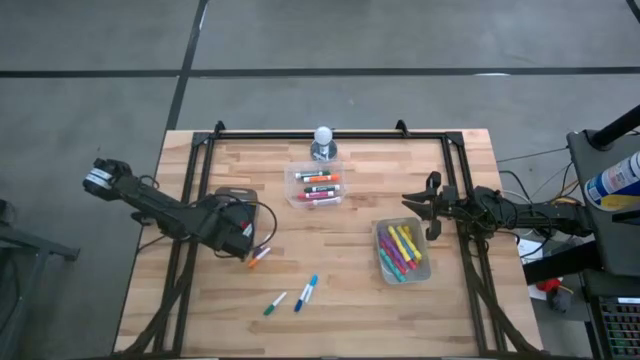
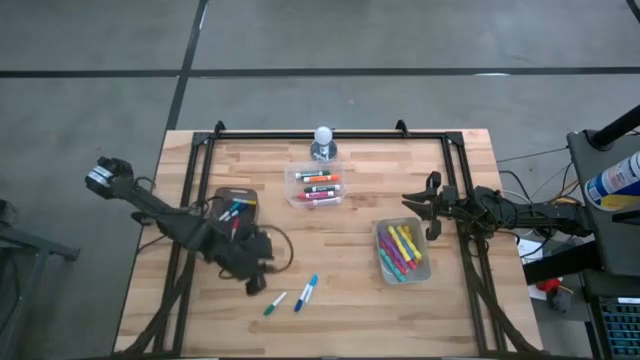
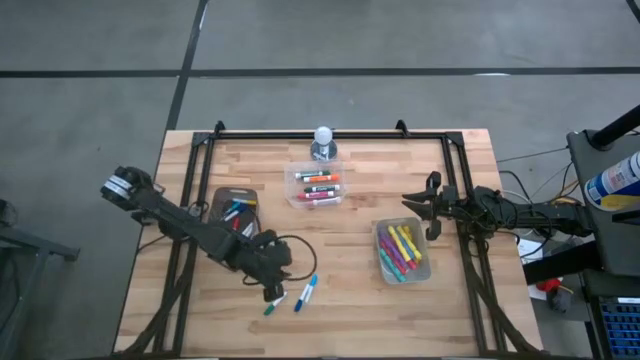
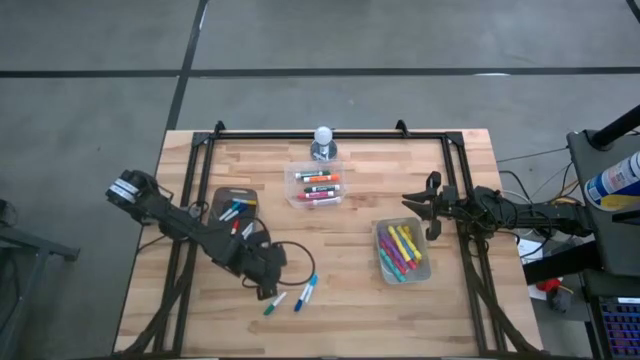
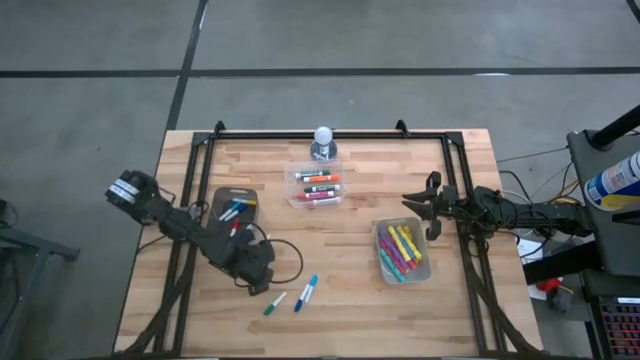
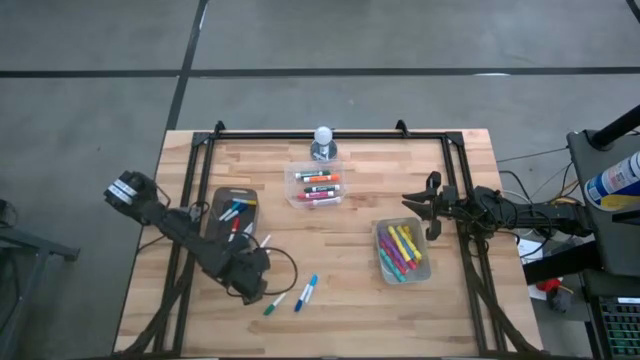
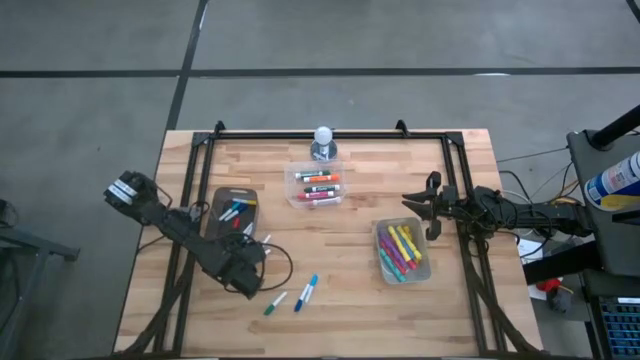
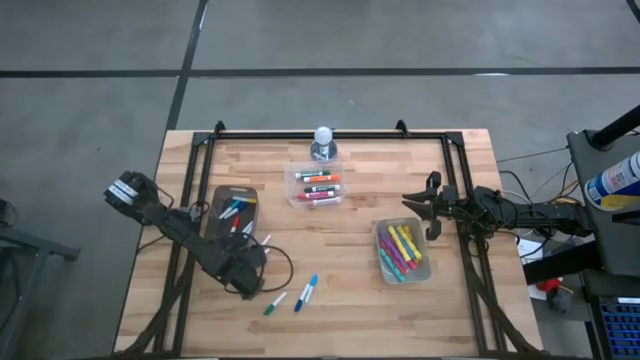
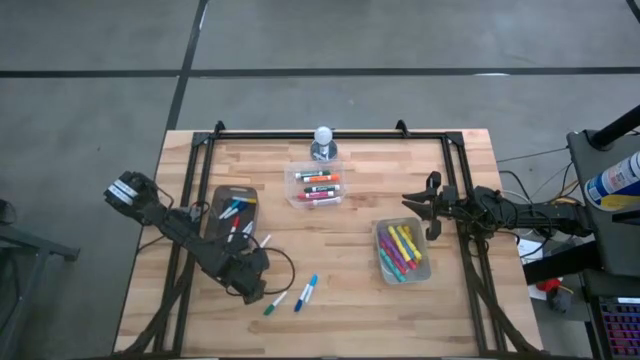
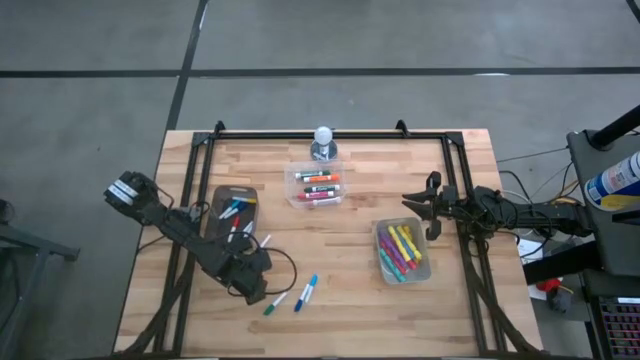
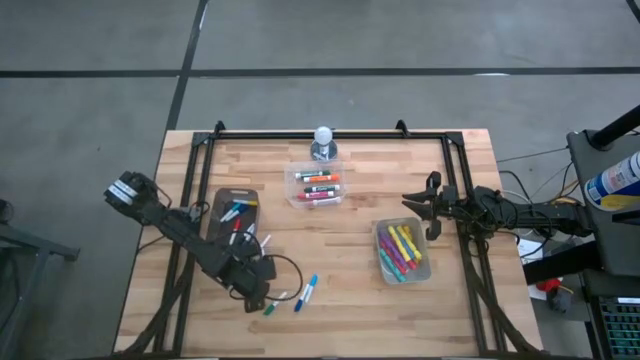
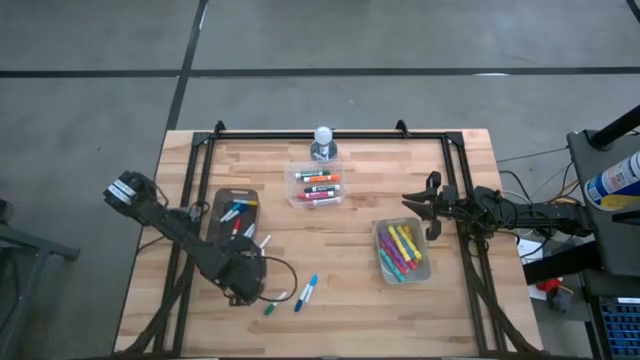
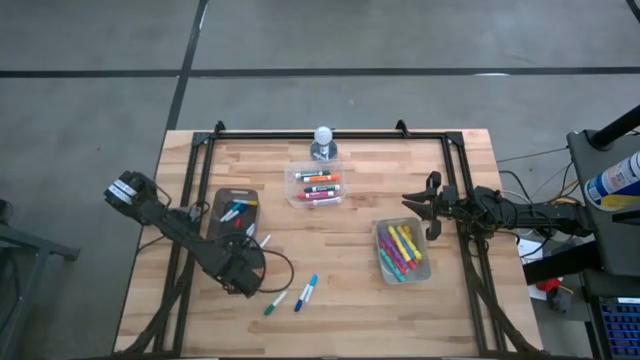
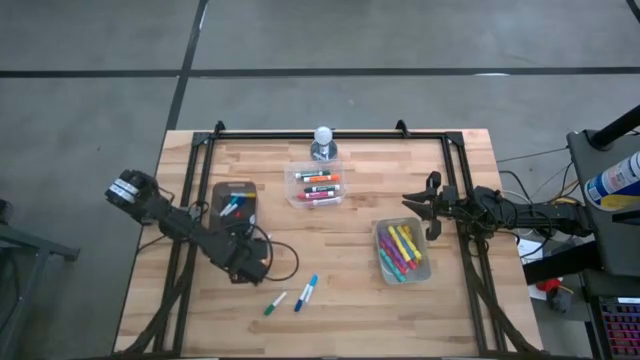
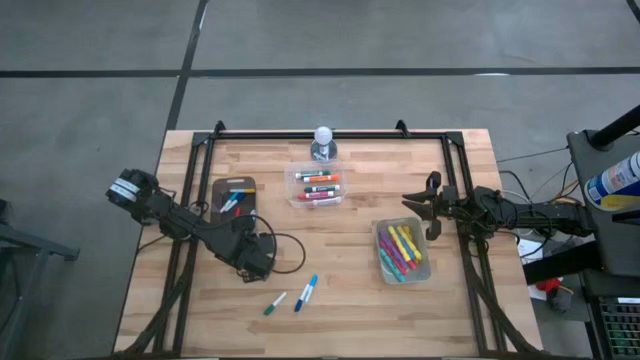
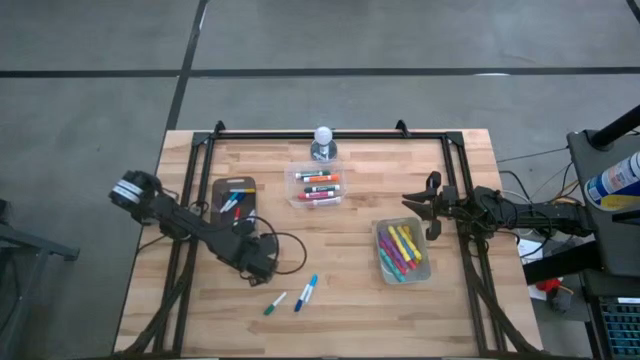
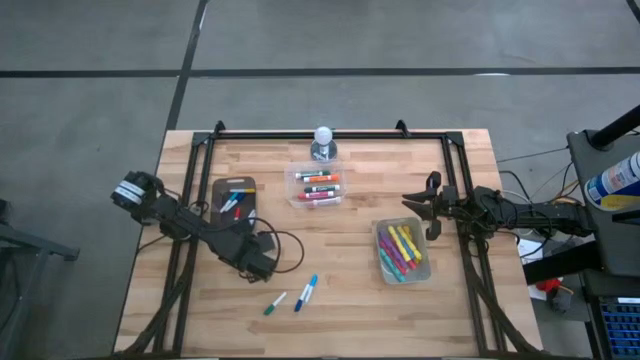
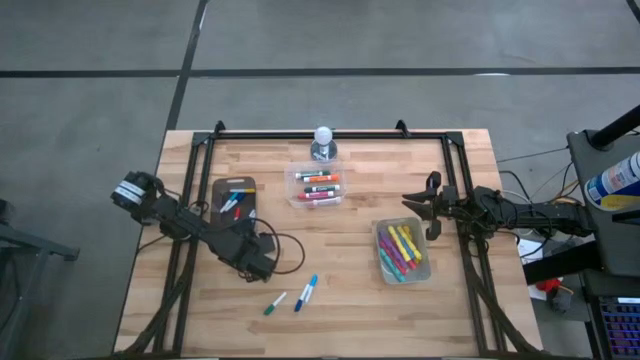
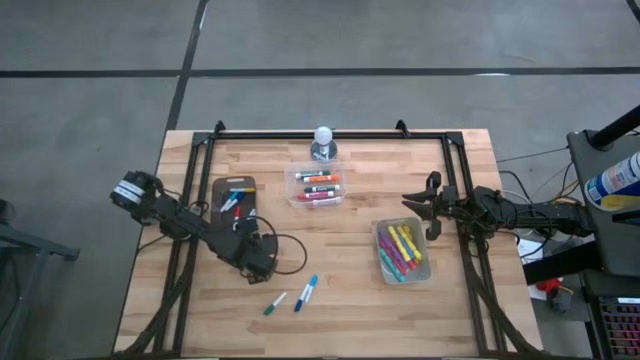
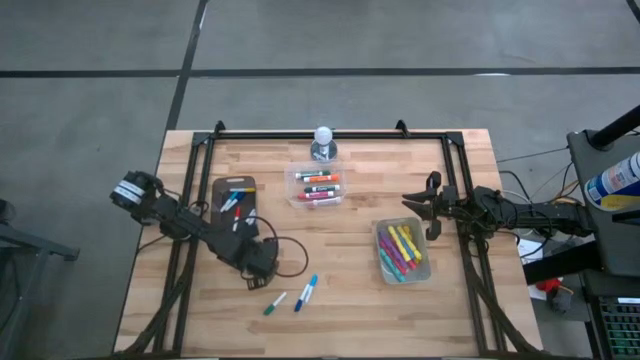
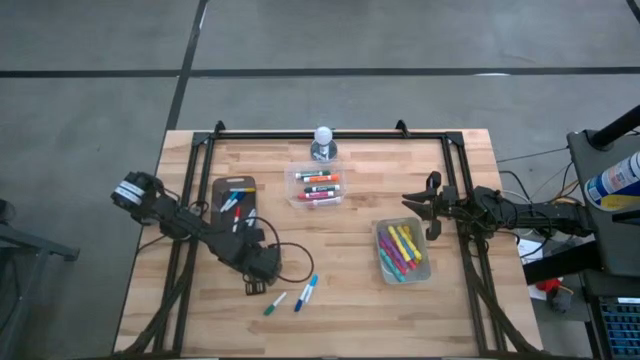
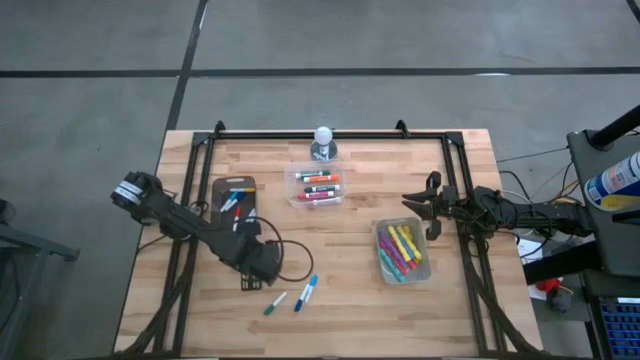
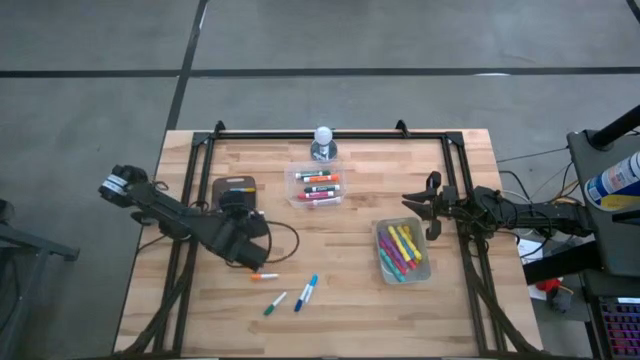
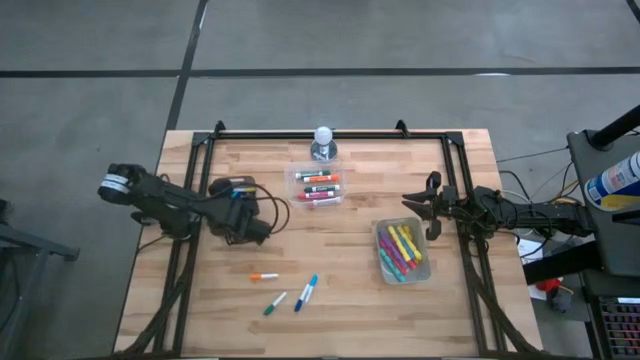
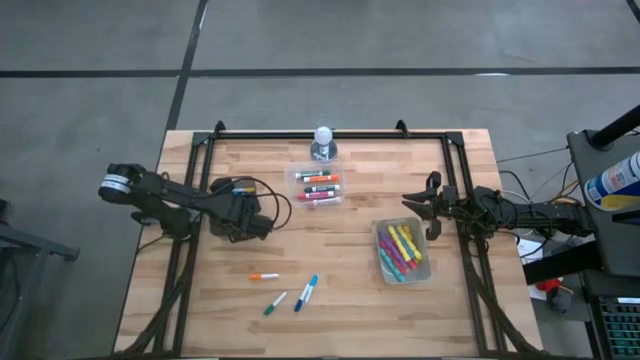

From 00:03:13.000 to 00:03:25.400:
Task: Pick & Place Markers
Put the purple mini marker into the transparent black bin

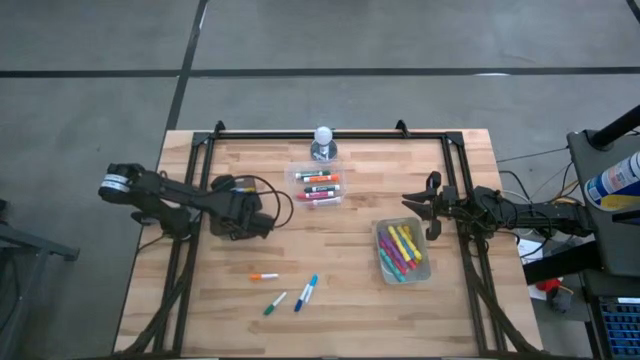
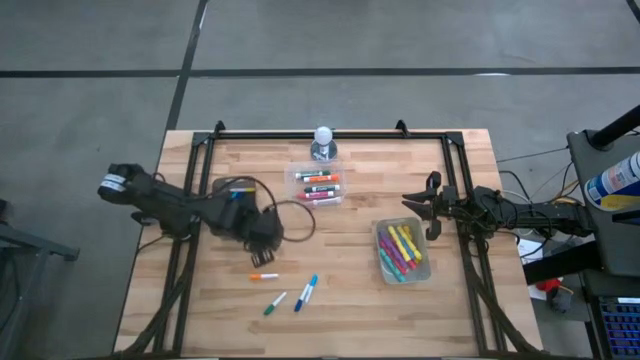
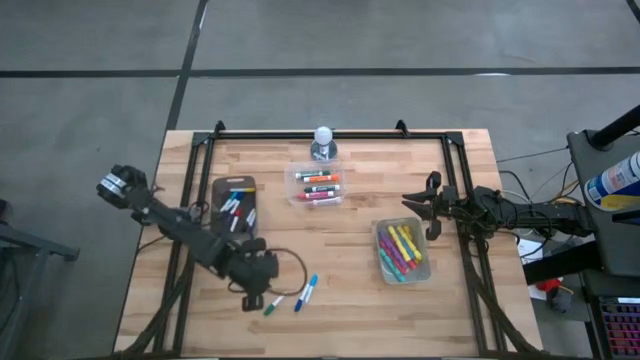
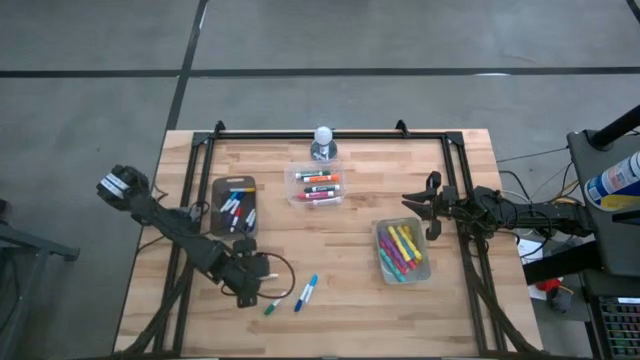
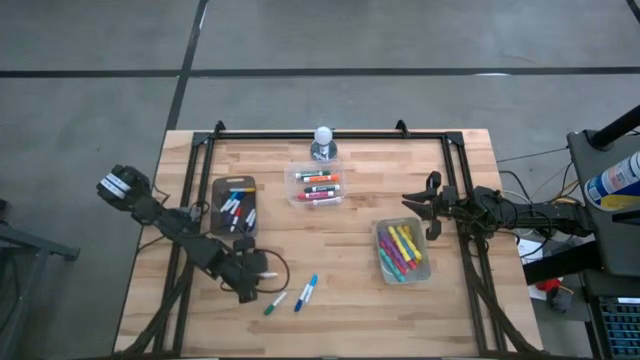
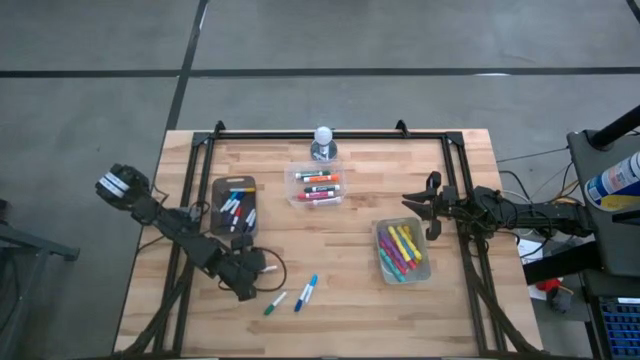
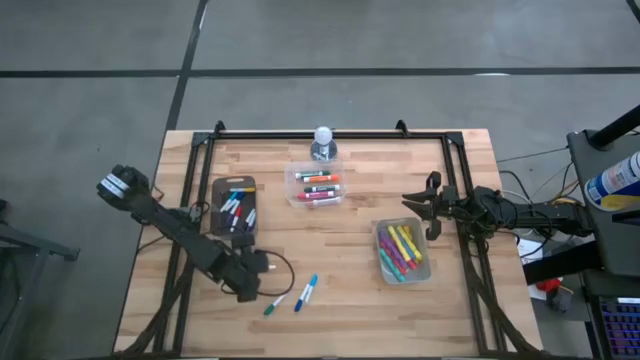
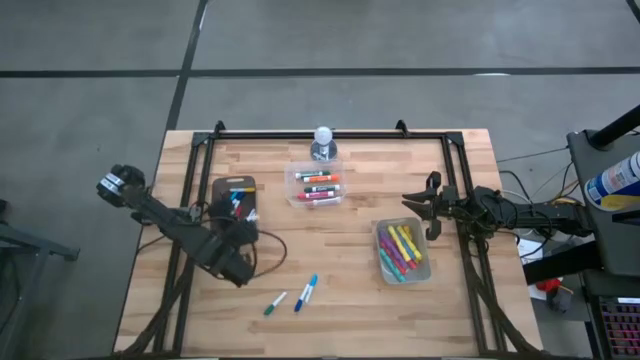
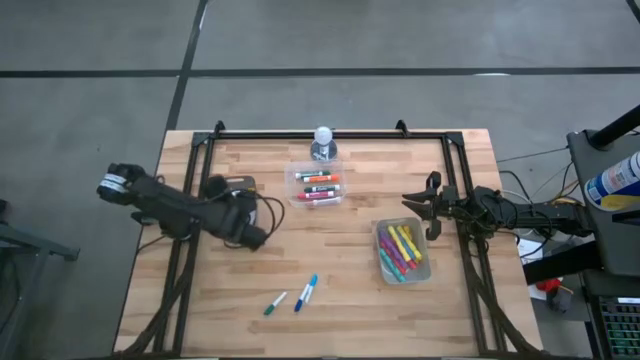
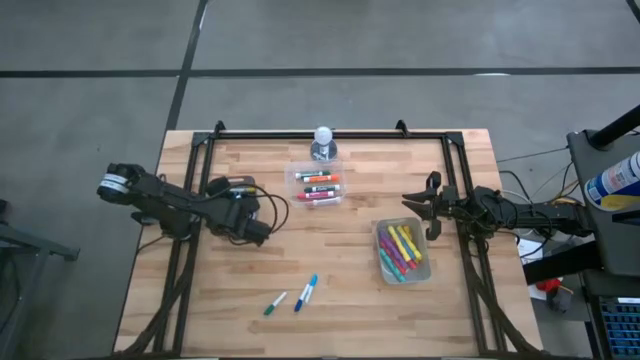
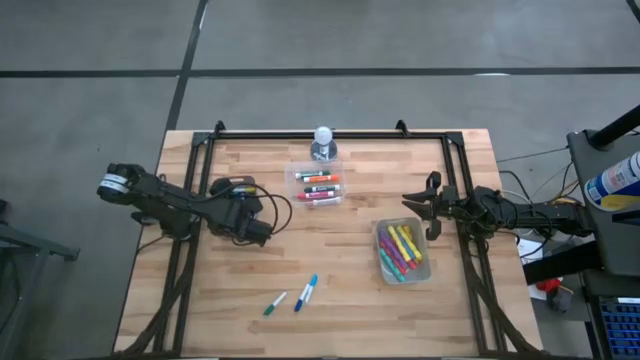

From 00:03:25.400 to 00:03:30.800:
Put the orange mini marker into the transparent black bin

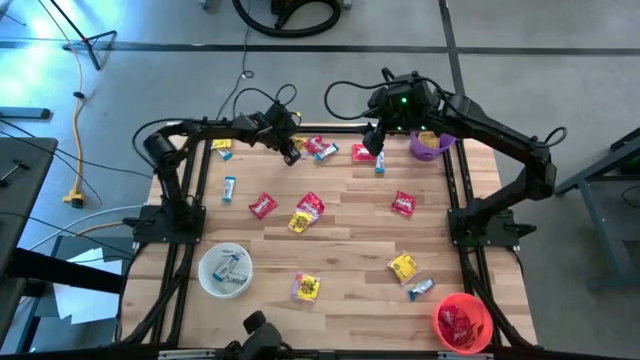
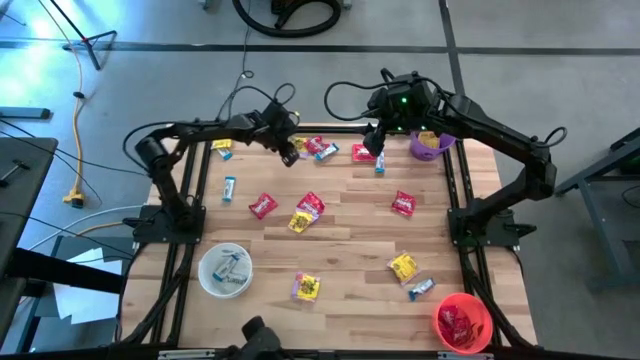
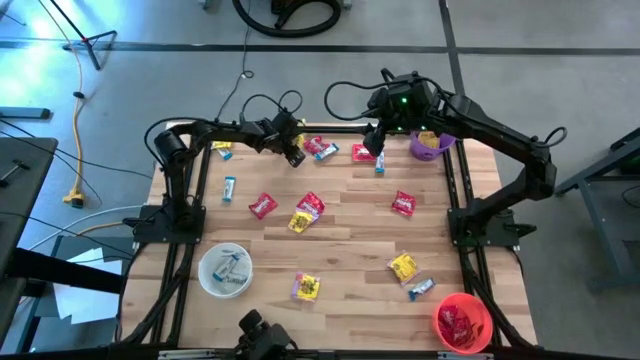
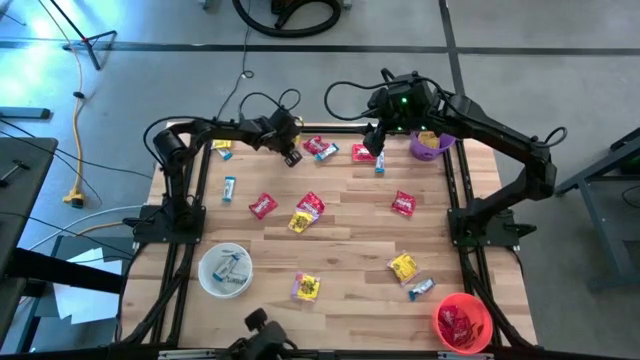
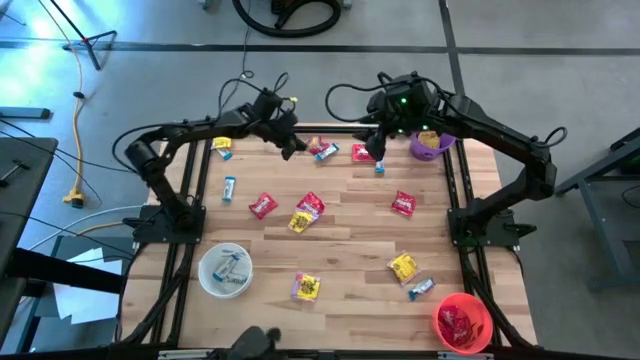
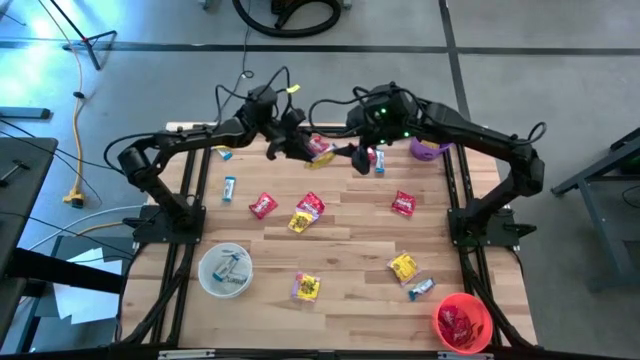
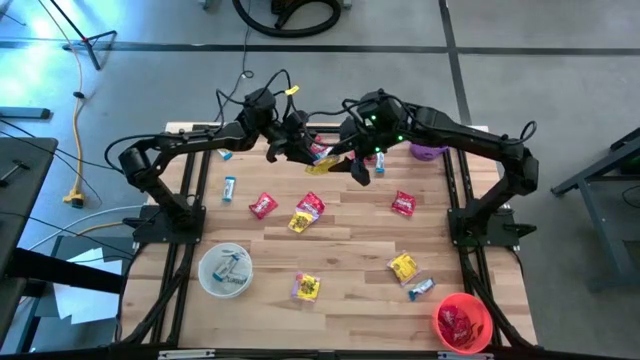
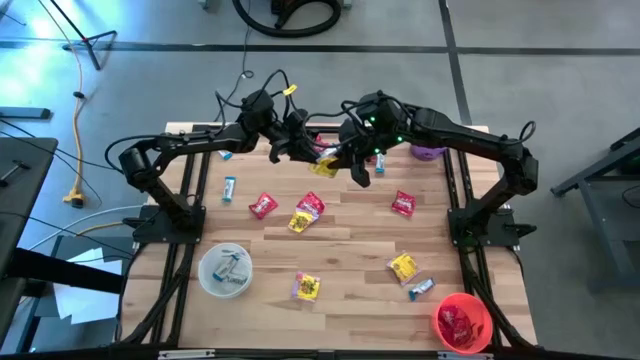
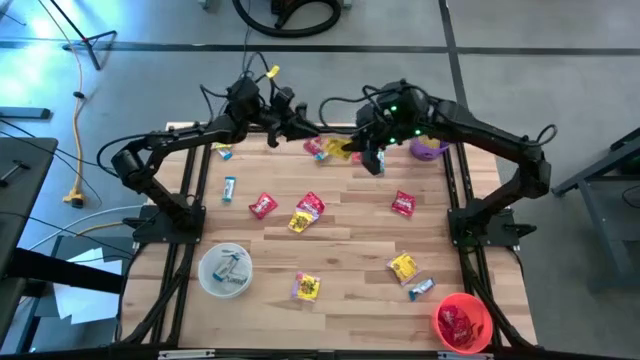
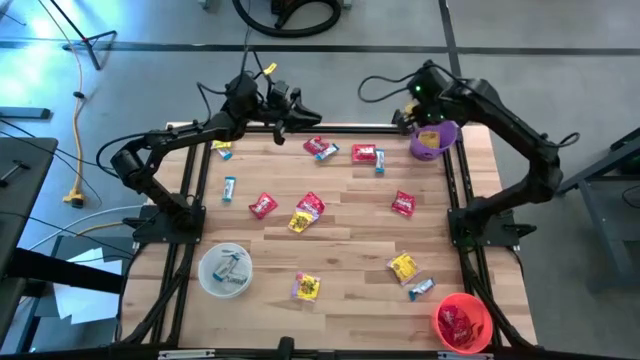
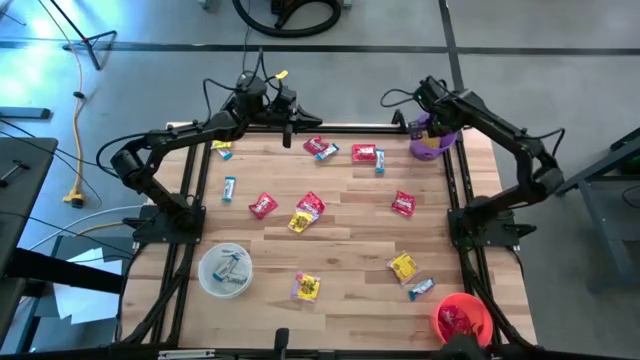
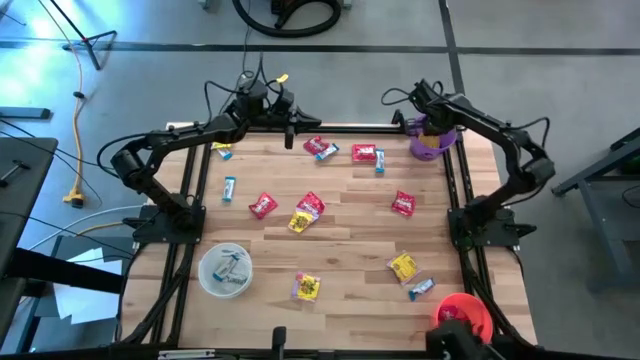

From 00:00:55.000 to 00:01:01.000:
Task: Sort candy
Put the yellow candy into the purple bin
